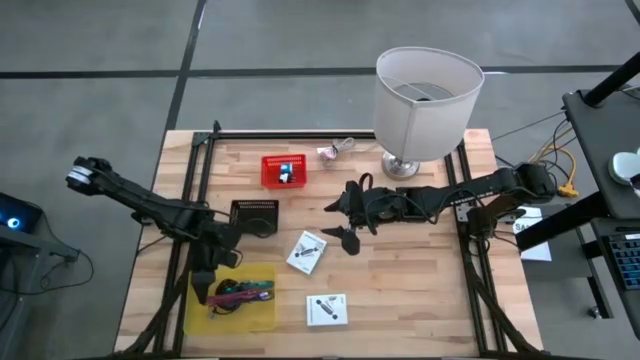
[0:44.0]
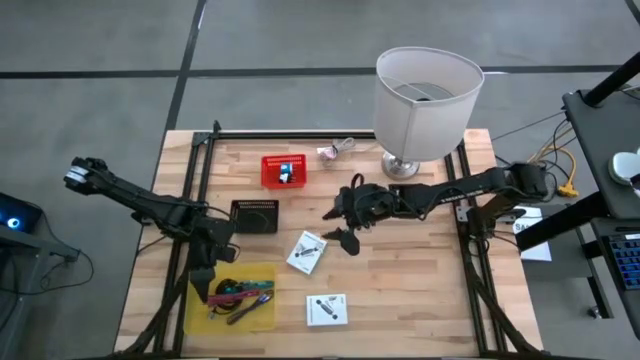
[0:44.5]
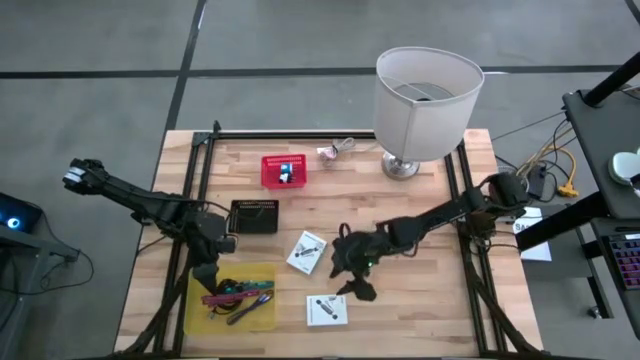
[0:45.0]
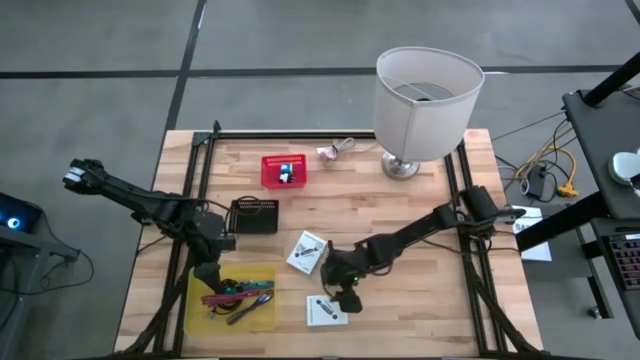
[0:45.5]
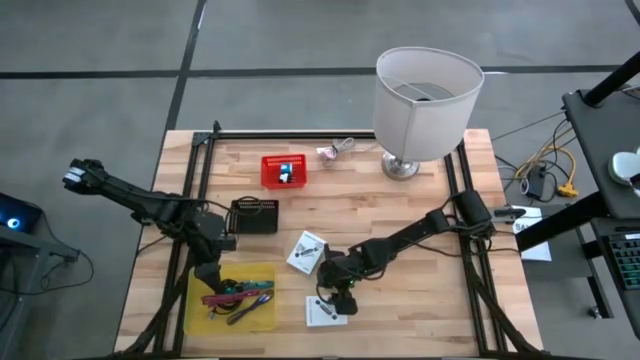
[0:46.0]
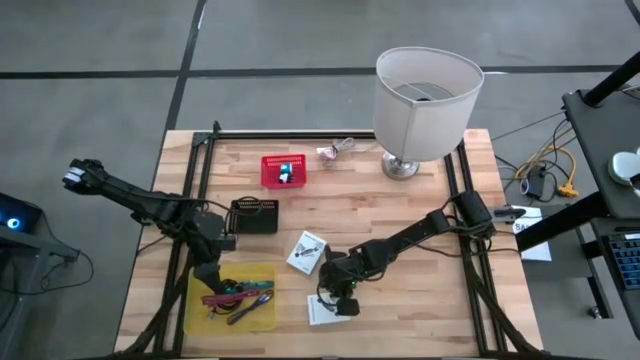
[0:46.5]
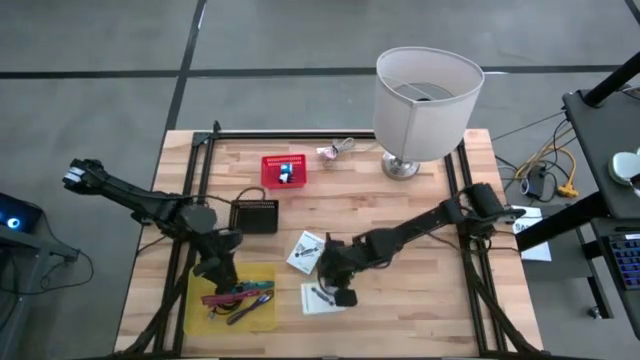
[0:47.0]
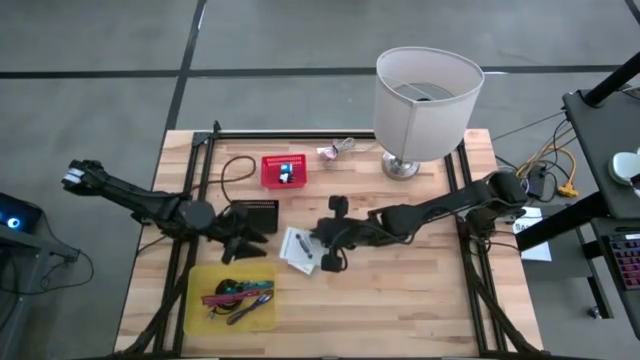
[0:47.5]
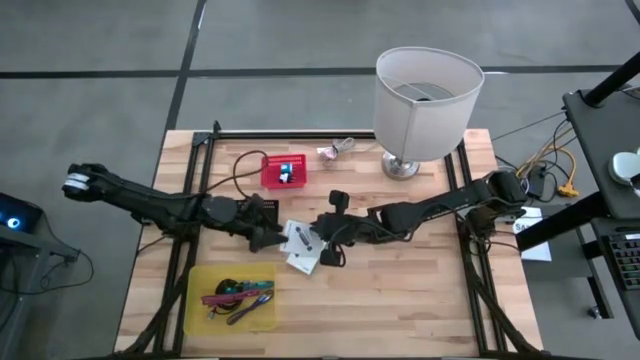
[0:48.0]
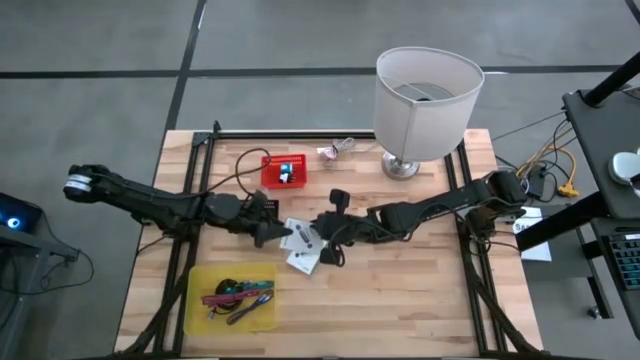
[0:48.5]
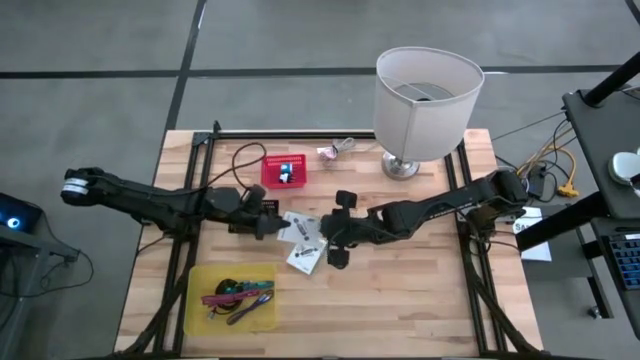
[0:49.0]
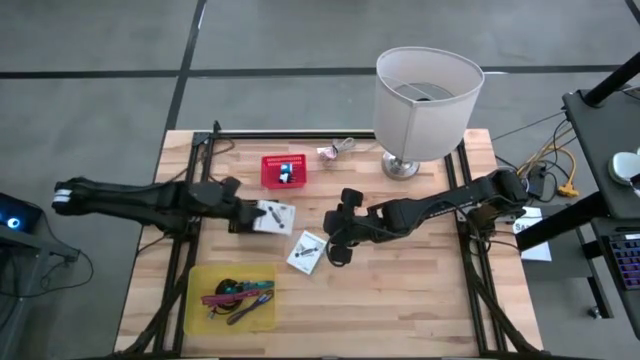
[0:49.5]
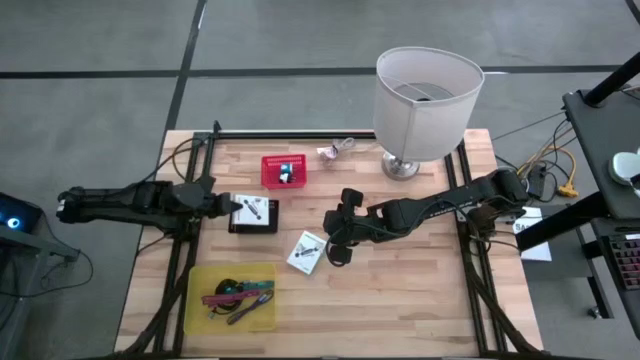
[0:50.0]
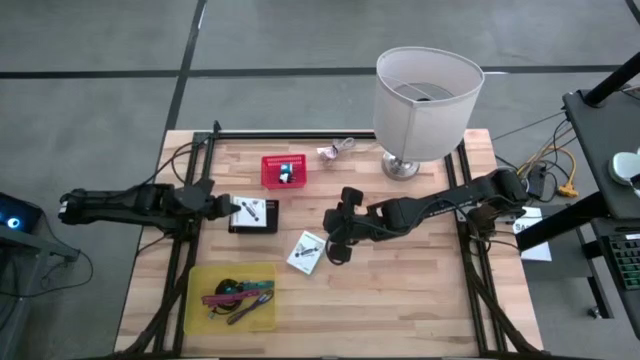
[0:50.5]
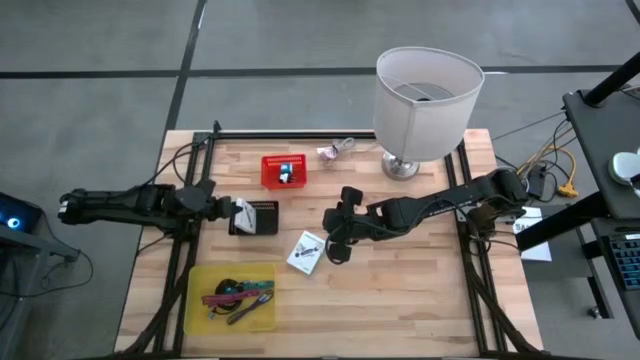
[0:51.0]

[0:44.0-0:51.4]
Task: Pick and place items into bin
Put the top card reader box into the black bin

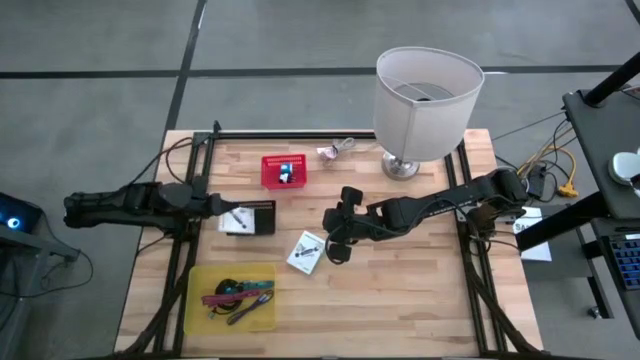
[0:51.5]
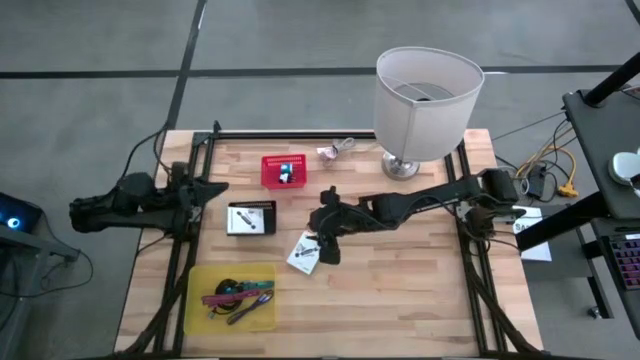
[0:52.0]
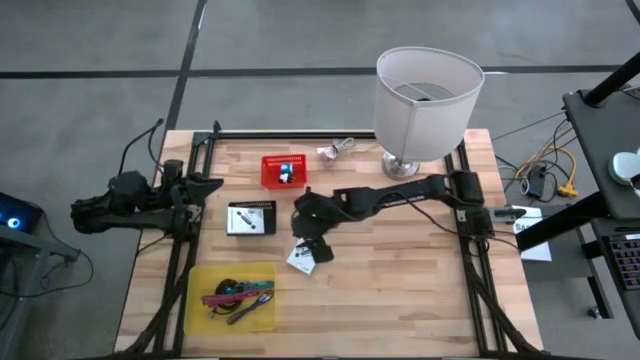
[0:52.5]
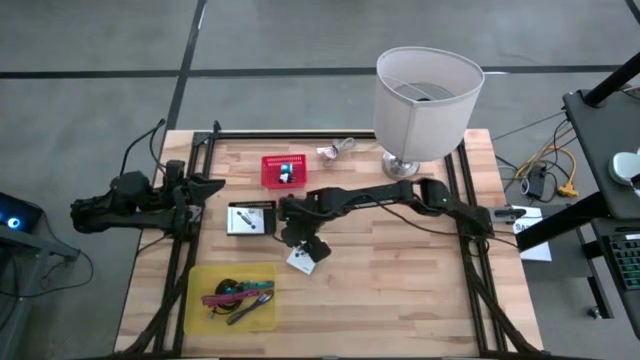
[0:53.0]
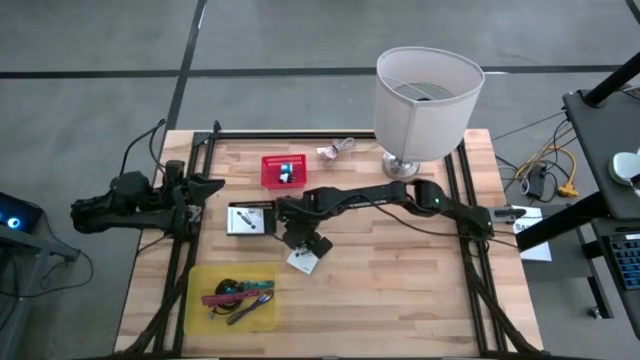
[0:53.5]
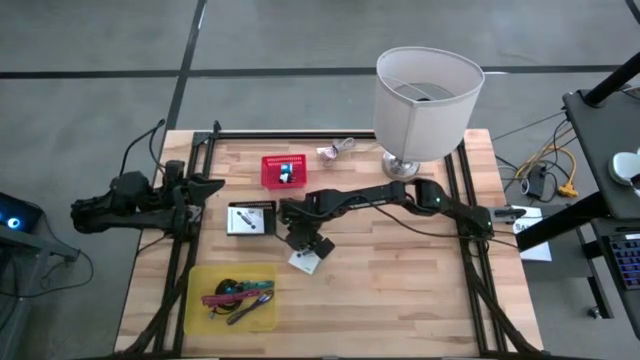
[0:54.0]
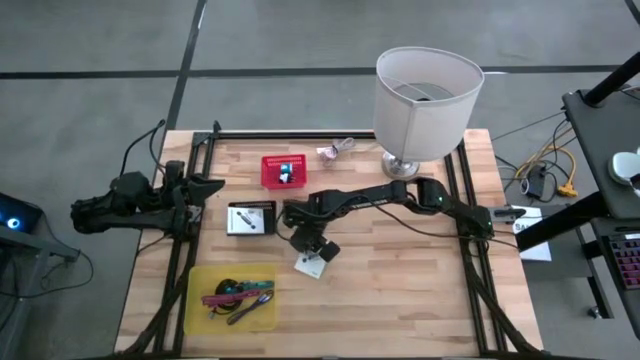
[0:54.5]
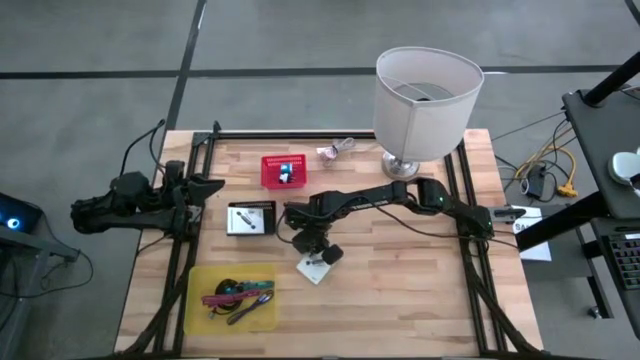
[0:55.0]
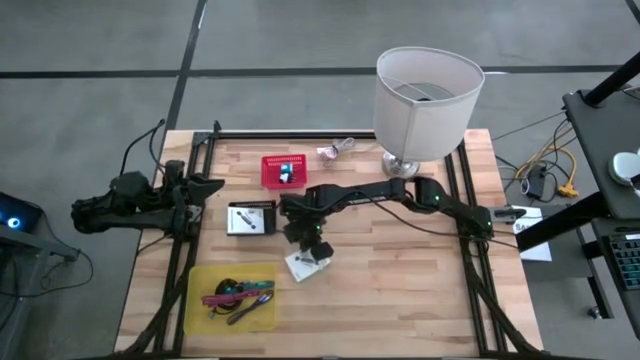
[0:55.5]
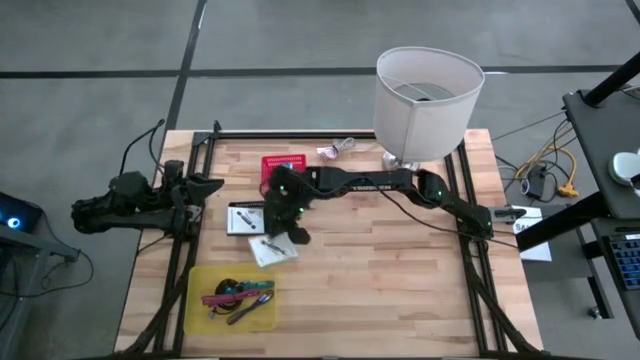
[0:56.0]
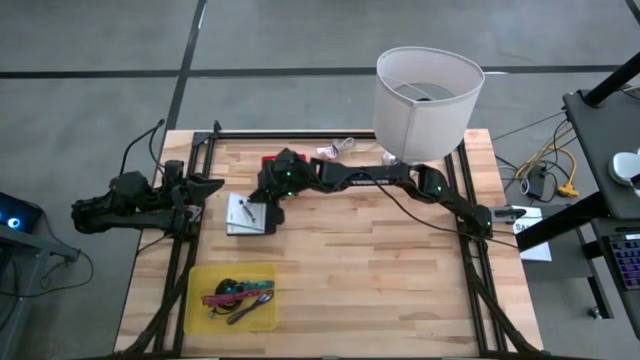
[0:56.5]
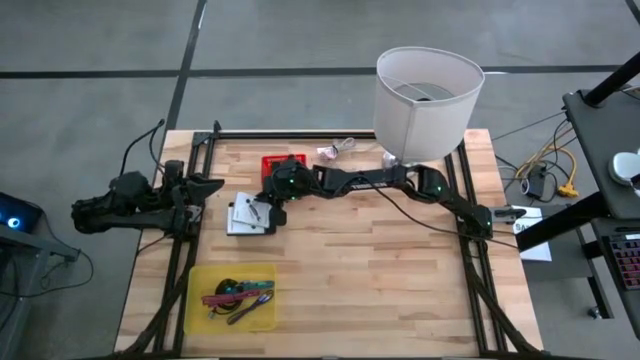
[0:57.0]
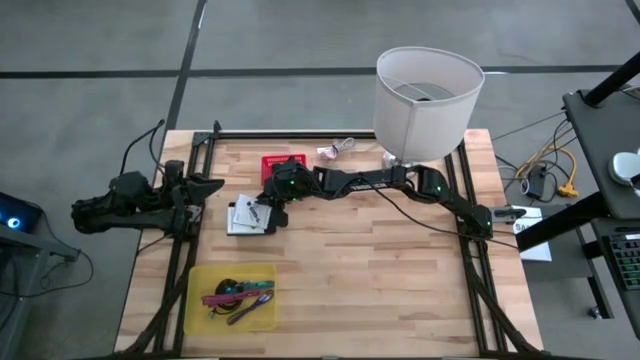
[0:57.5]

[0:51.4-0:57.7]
Put the card reader box into the black bin

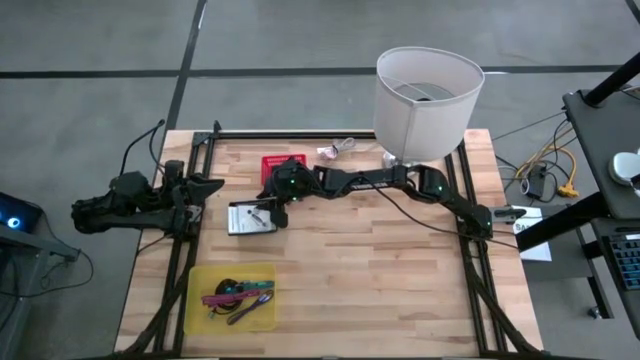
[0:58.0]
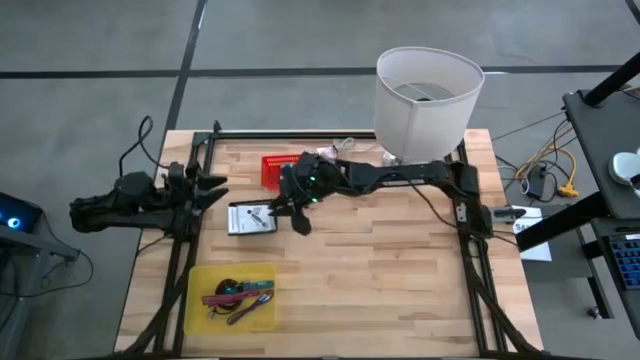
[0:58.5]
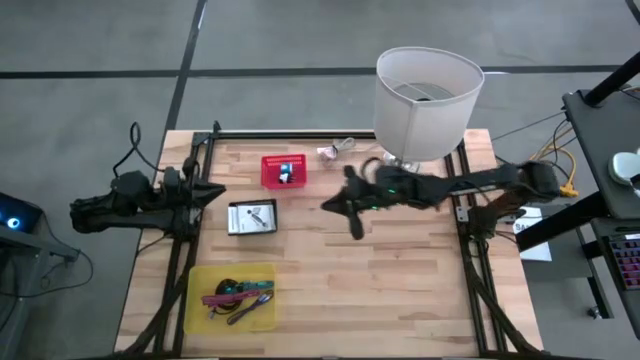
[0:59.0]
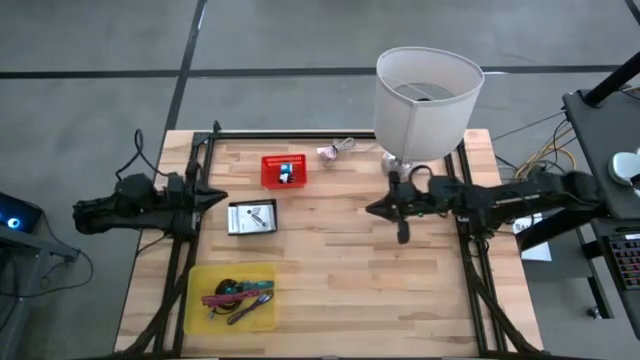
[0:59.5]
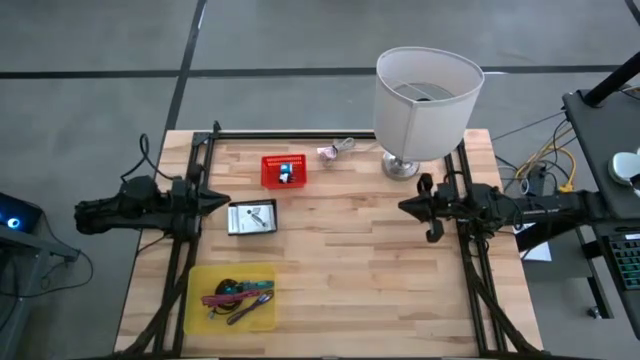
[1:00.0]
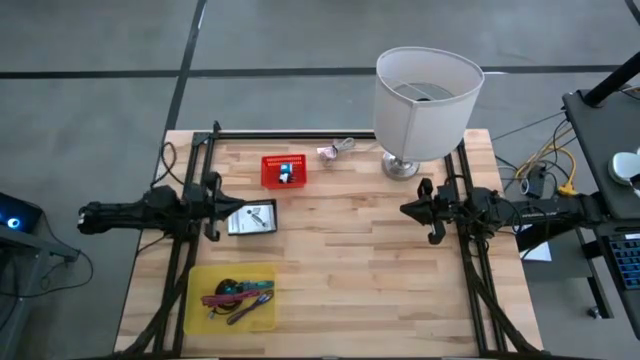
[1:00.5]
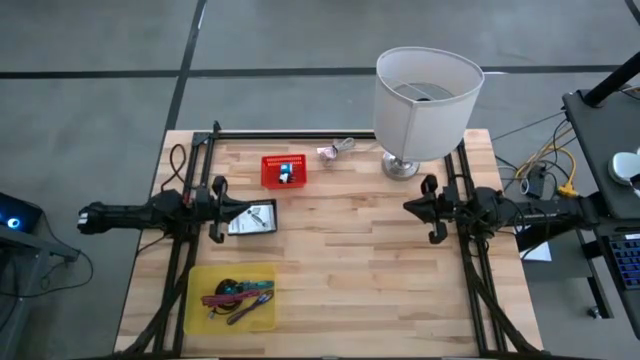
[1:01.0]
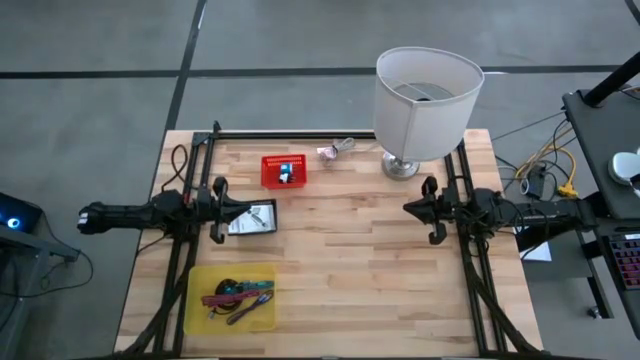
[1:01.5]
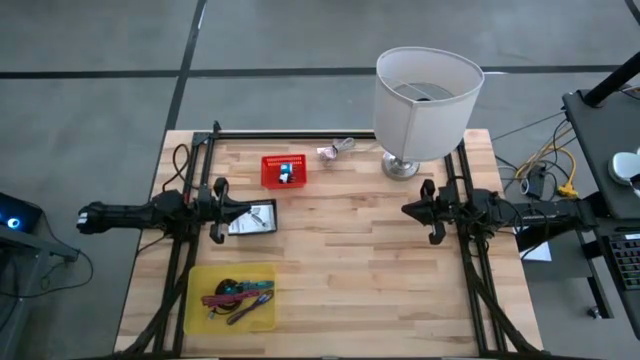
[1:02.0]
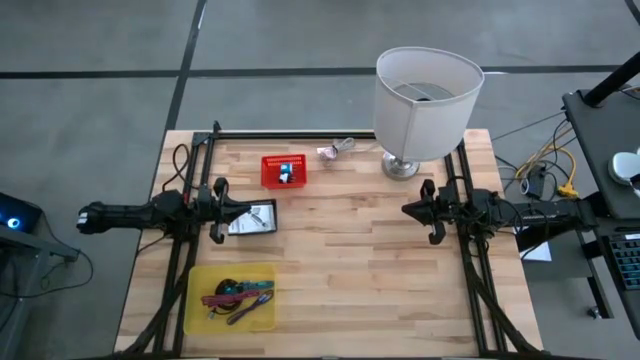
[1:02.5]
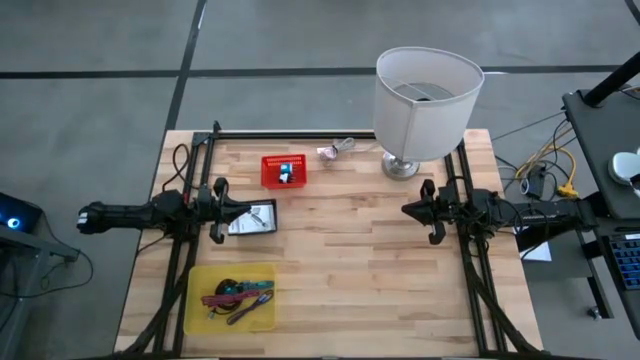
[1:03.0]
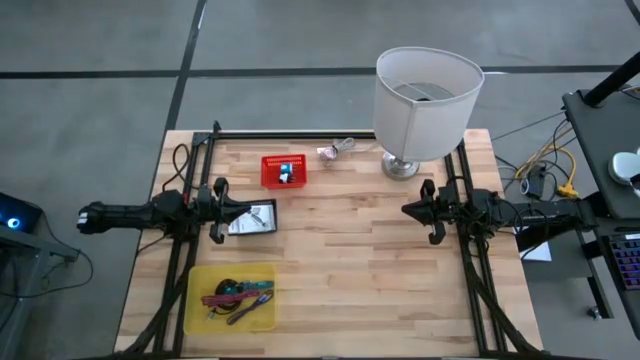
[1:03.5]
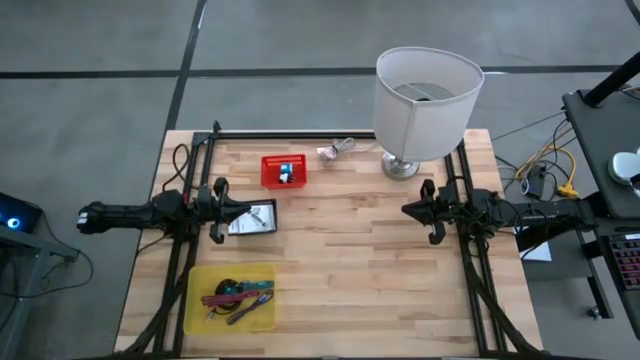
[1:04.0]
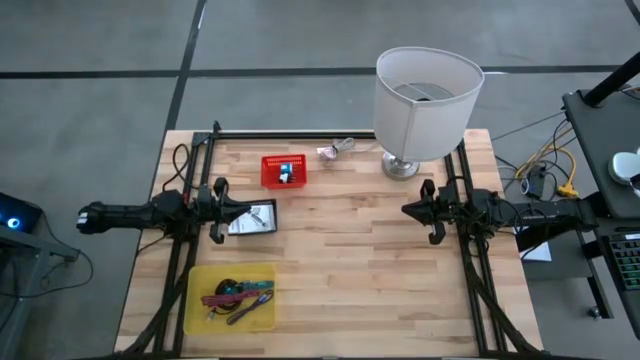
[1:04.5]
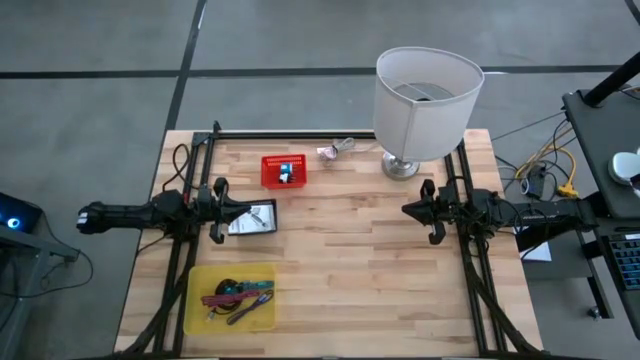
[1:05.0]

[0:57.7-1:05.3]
Return to Home Position
